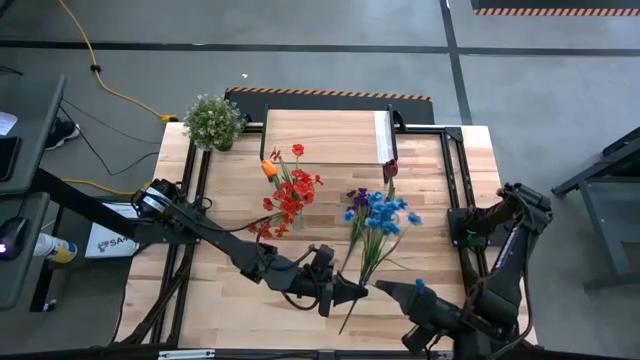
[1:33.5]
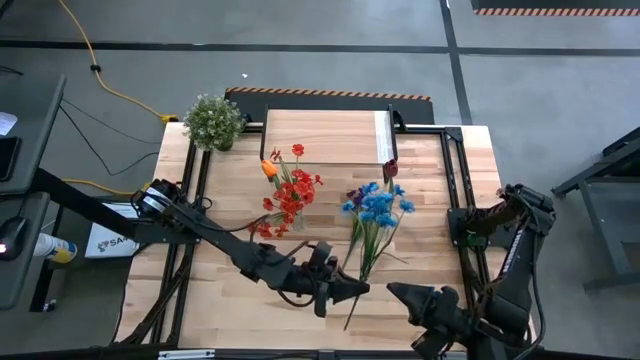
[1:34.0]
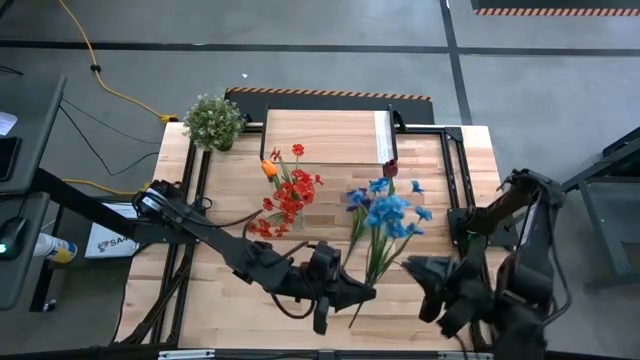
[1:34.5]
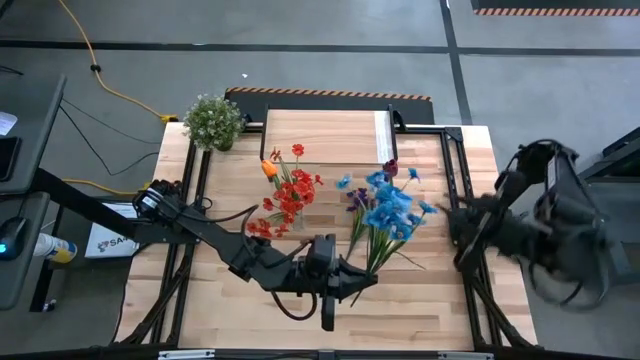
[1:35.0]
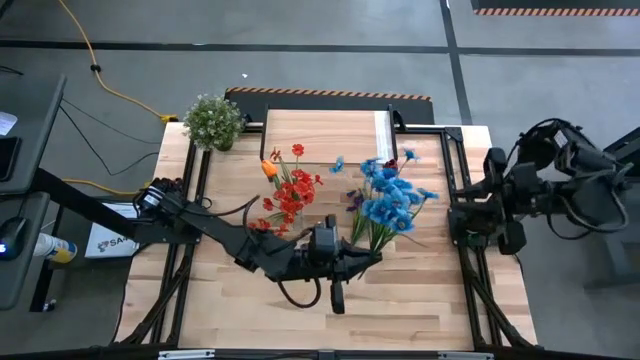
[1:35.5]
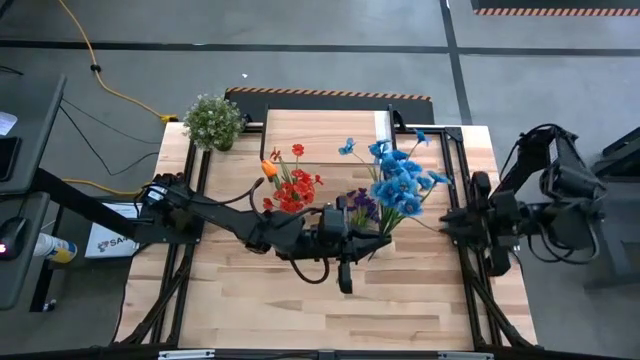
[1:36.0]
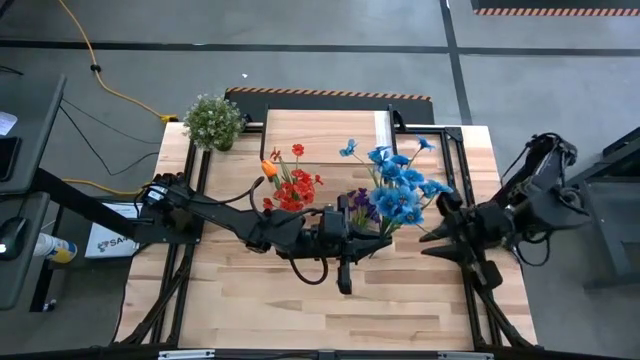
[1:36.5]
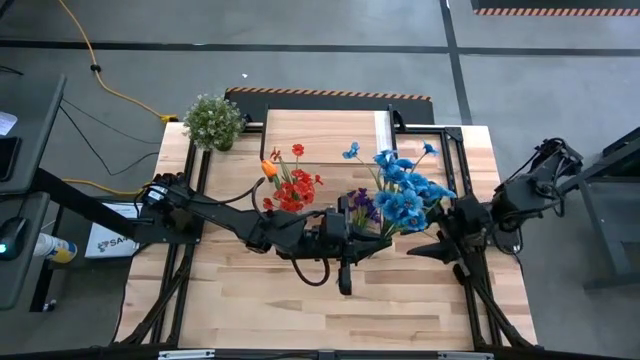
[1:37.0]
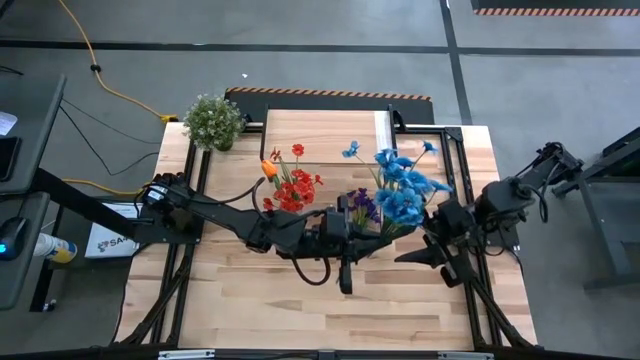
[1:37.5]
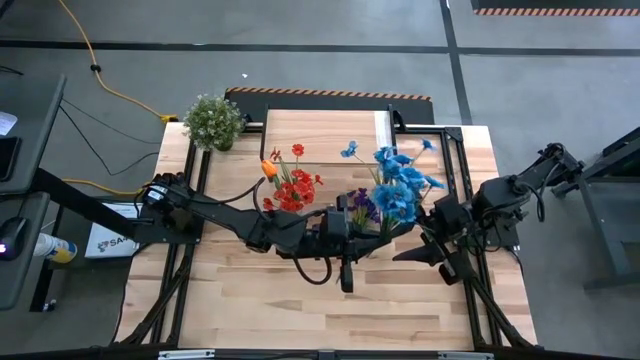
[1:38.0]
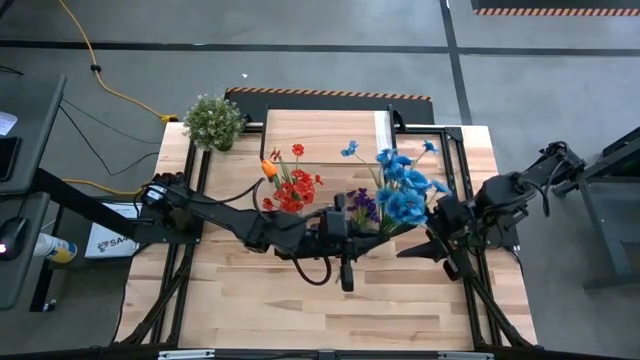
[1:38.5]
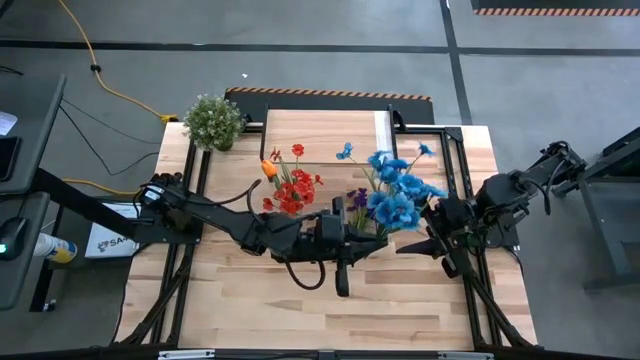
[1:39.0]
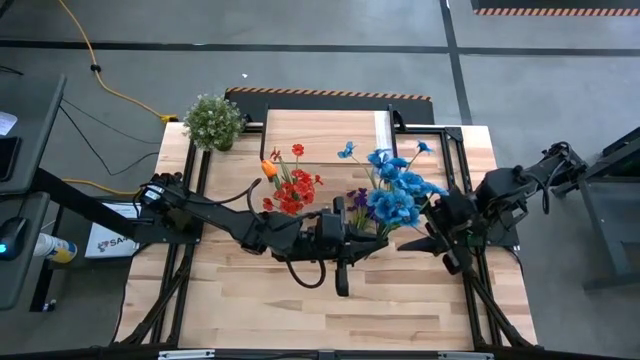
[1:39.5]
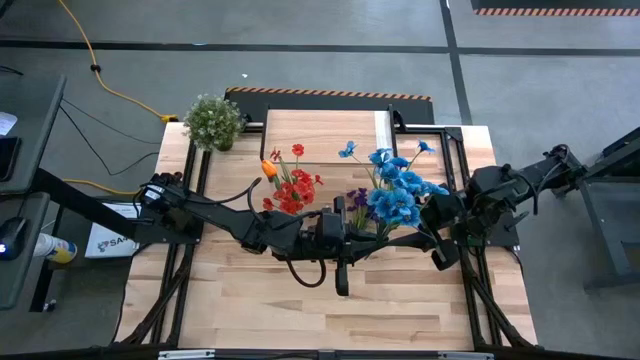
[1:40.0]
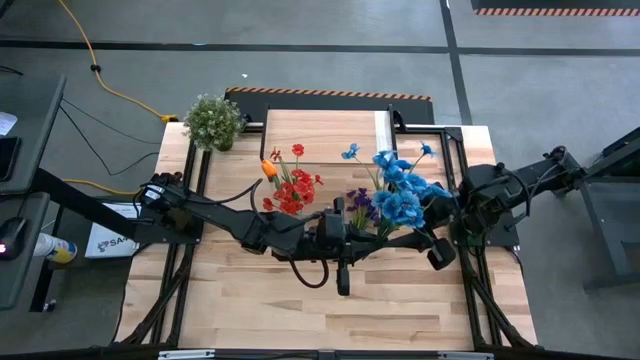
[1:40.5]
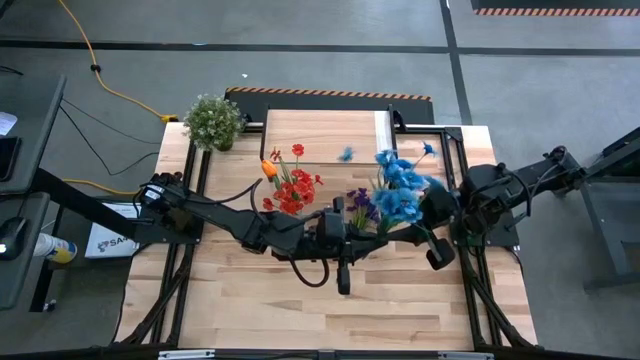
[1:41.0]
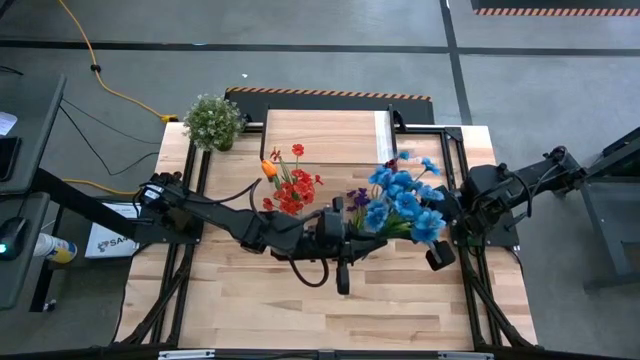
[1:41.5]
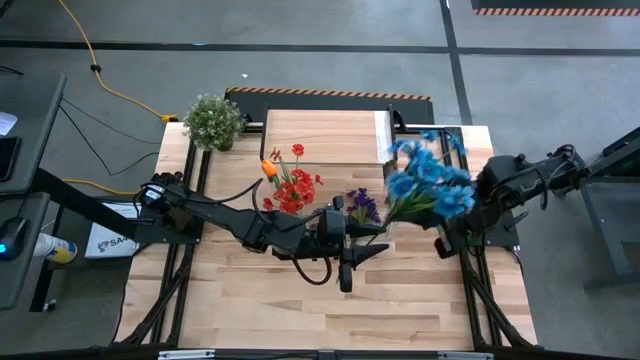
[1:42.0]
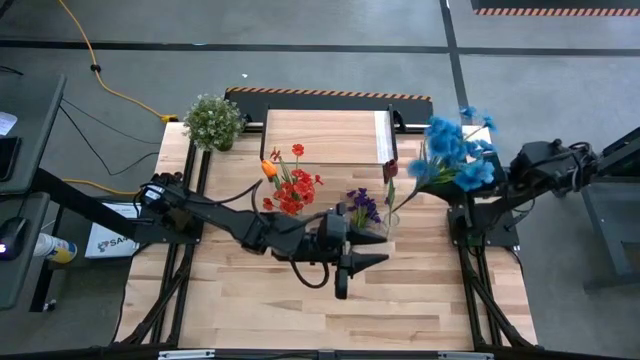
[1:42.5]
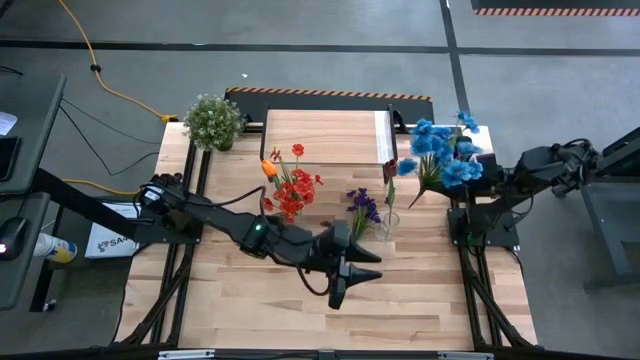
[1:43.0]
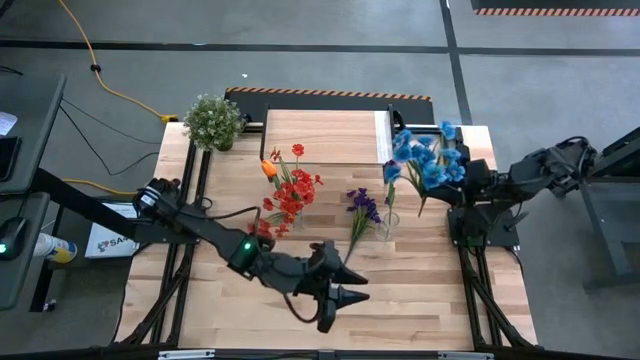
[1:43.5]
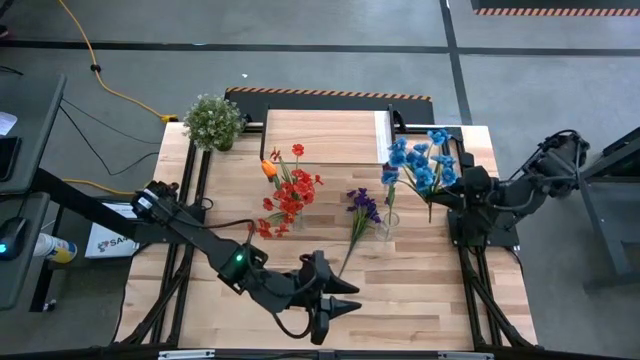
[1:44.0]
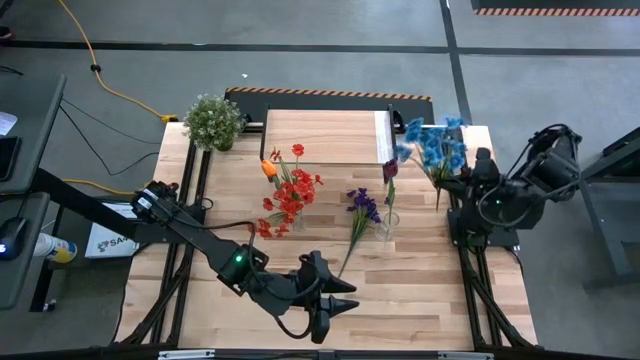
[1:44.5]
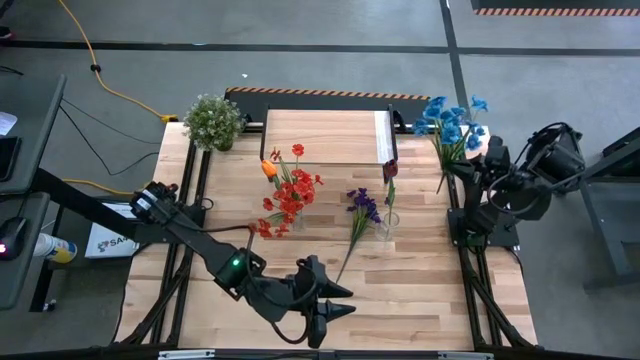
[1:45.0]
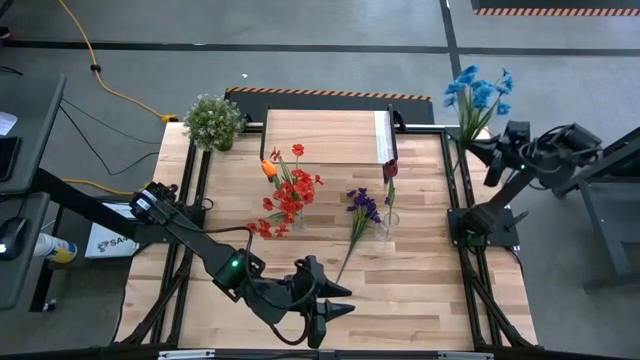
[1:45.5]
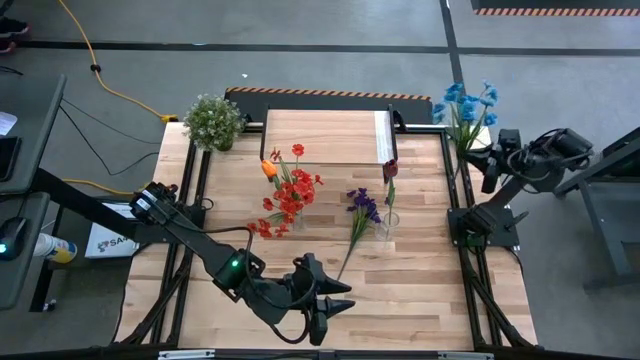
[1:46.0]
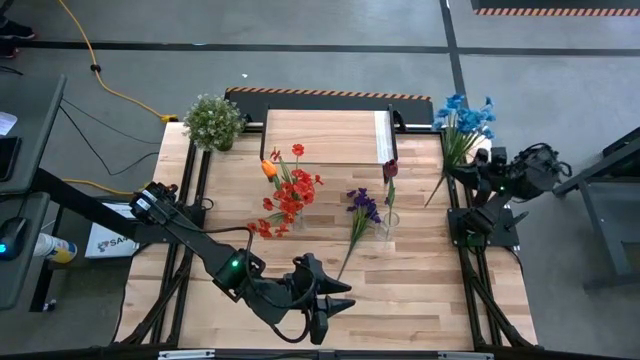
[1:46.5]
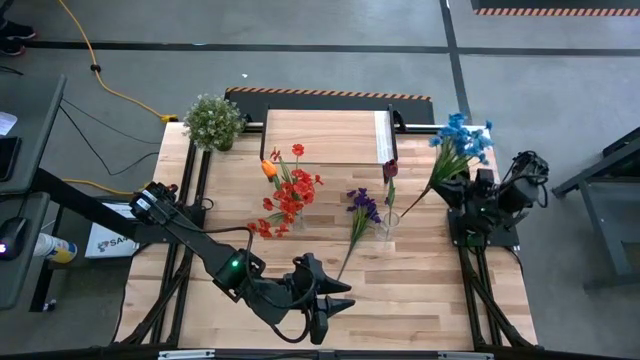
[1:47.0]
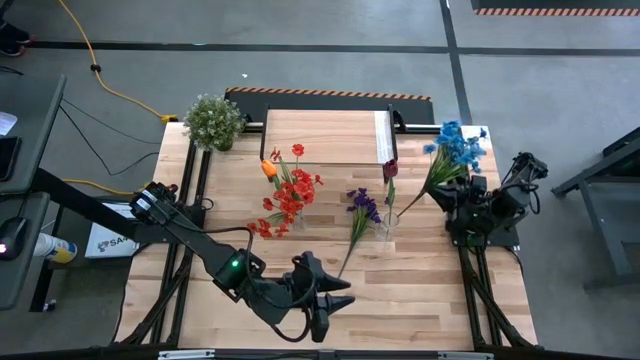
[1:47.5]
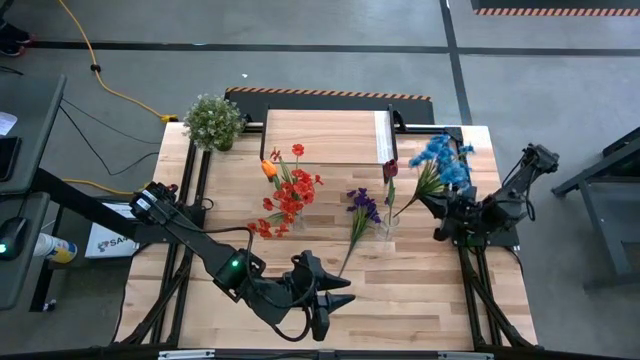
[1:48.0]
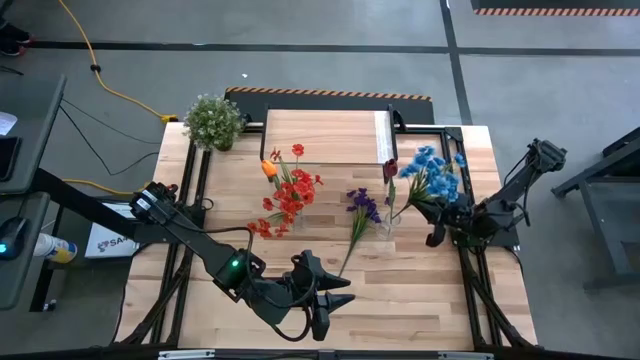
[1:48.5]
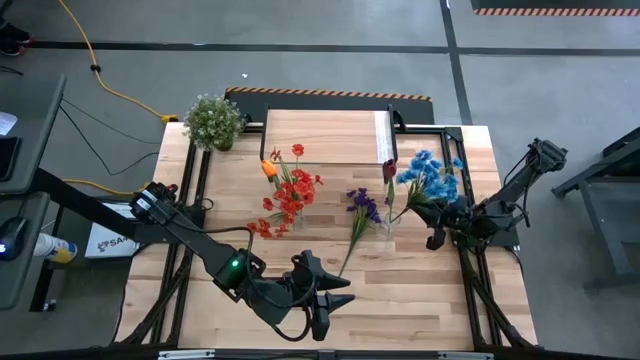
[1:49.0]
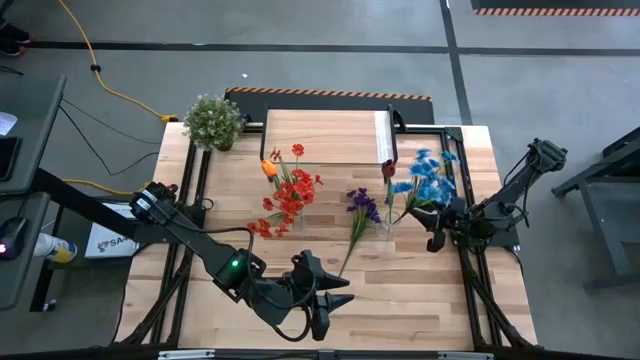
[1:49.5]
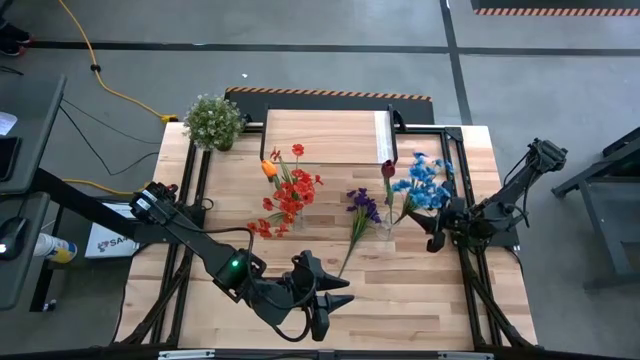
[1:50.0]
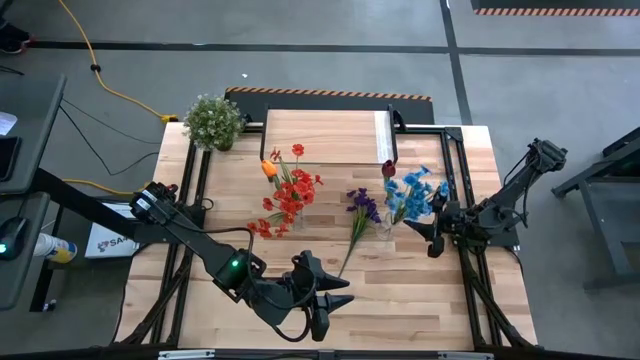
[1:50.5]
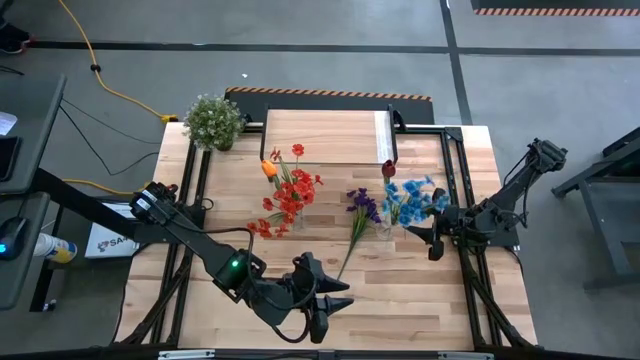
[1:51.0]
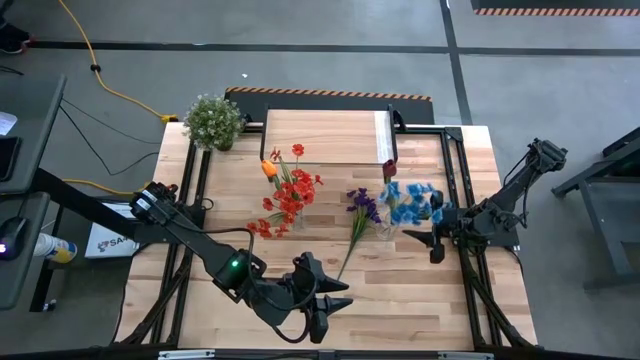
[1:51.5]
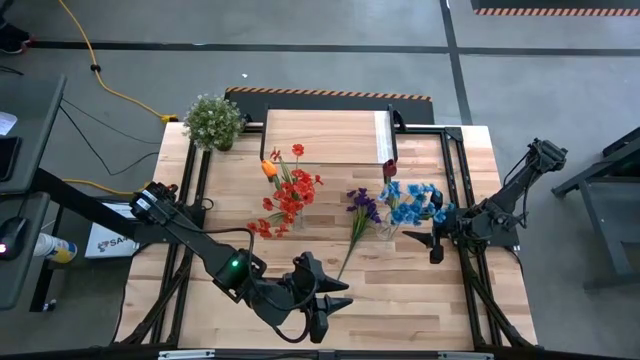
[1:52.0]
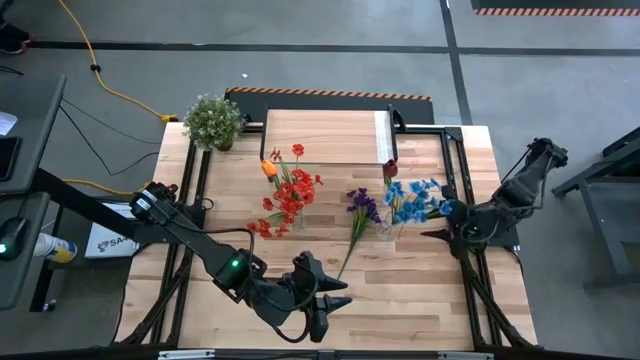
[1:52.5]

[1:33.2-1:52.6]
Task: Pick and place flowers into a vace then onto a shelf
Put the blue flowers into the right transparent vase

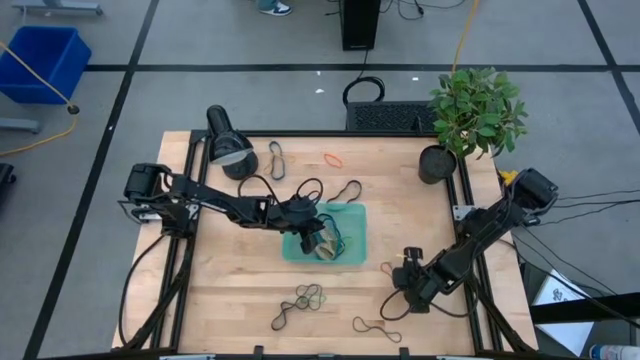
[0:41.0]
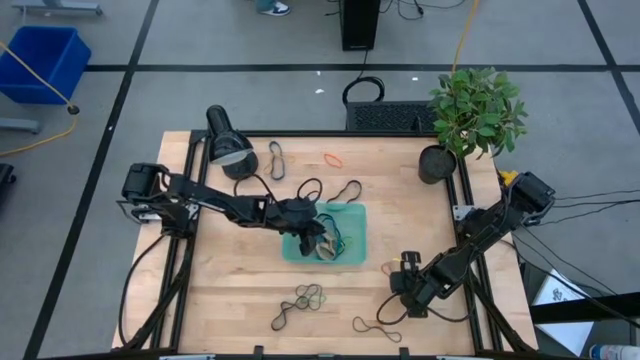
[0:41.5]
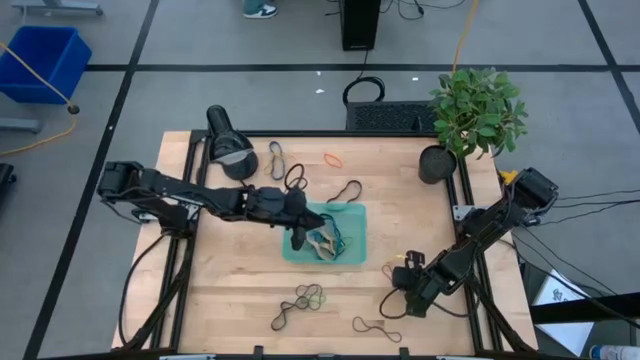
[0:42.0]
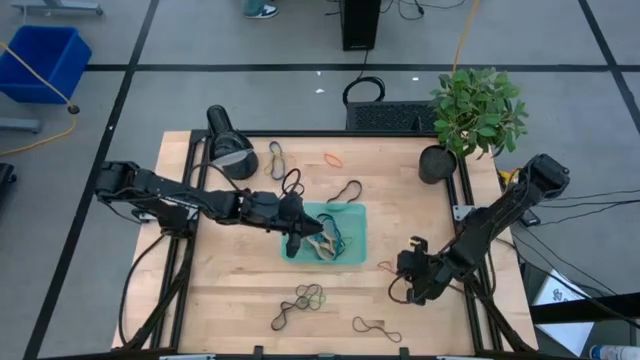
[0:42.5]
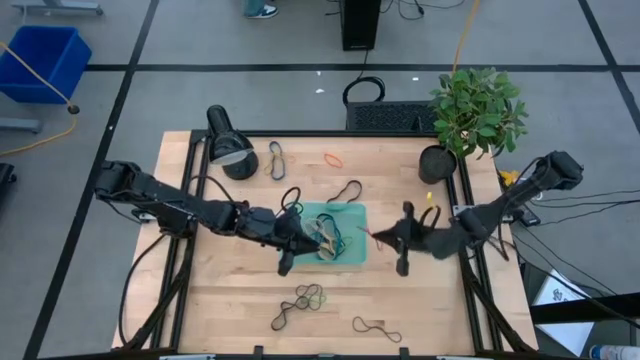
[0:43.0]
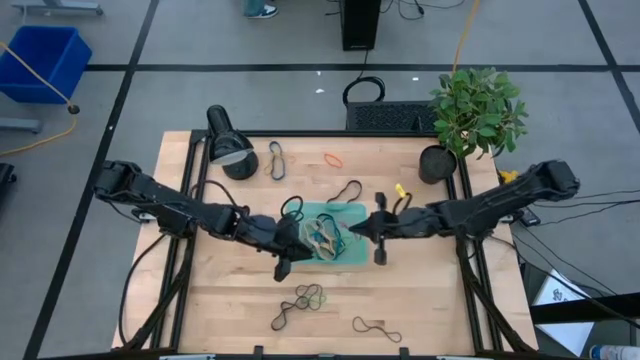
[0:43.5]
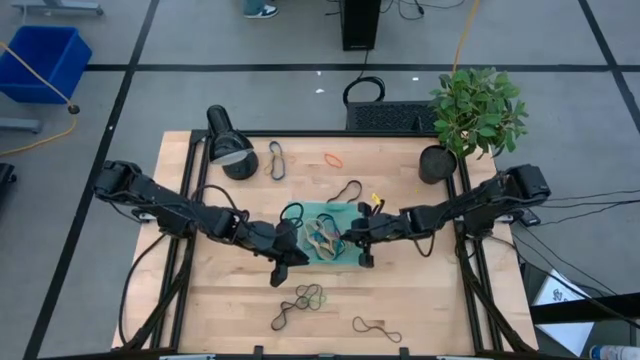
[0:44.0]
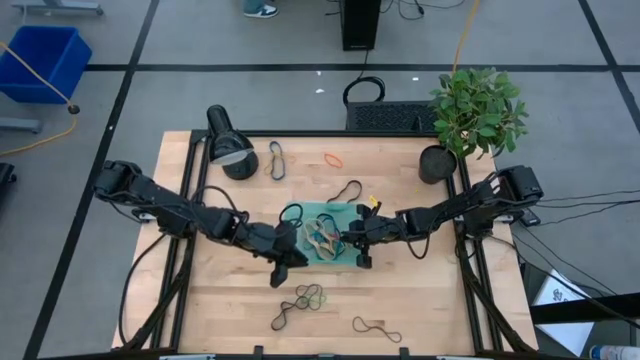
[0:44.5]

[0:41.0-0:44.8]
Task: Pick and place rubber bands into bin
Put the red rubber band into the green bin
